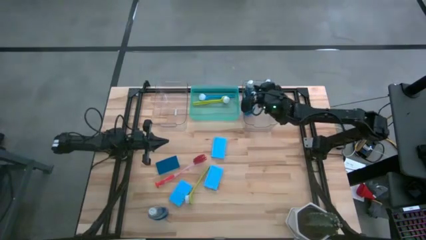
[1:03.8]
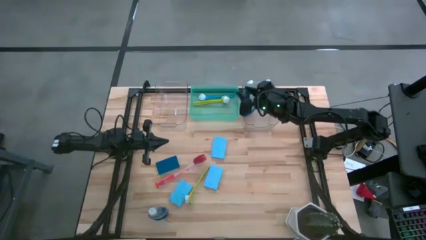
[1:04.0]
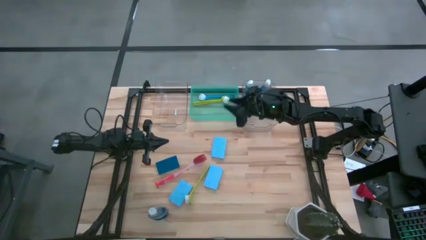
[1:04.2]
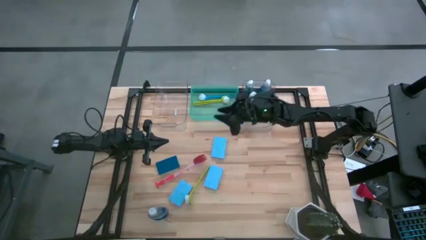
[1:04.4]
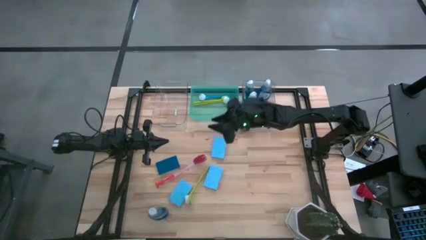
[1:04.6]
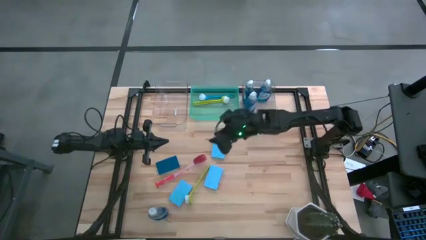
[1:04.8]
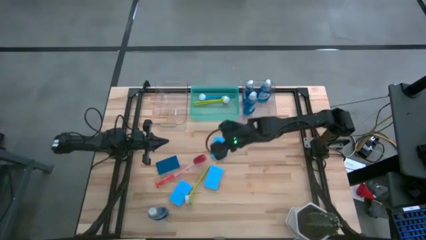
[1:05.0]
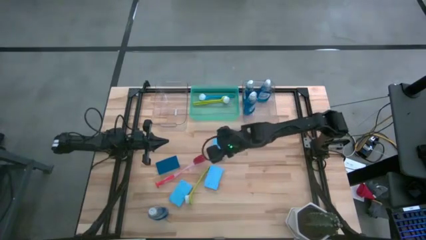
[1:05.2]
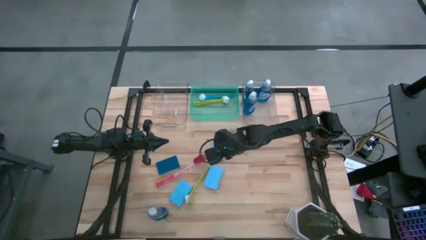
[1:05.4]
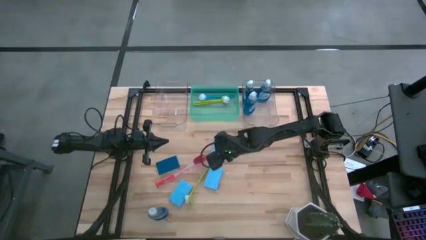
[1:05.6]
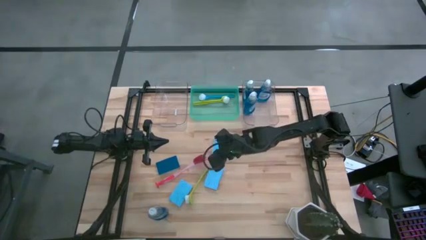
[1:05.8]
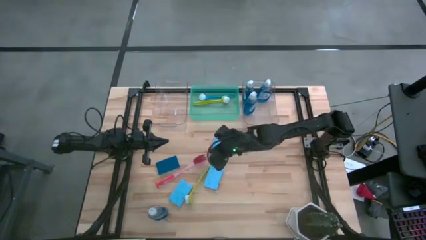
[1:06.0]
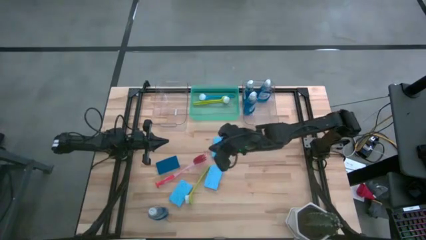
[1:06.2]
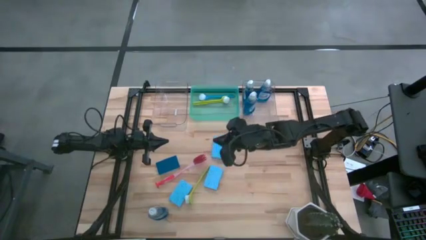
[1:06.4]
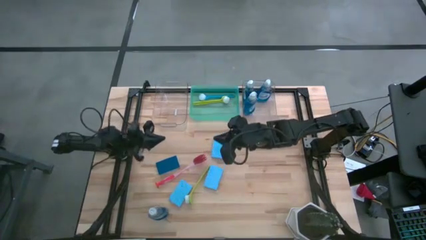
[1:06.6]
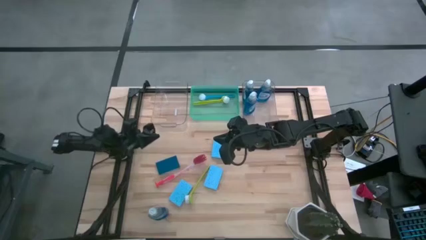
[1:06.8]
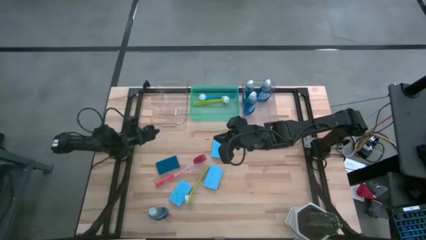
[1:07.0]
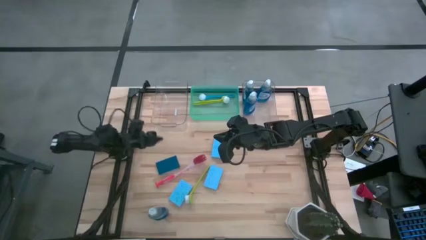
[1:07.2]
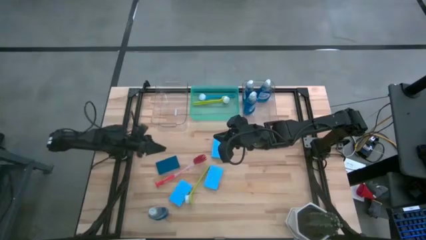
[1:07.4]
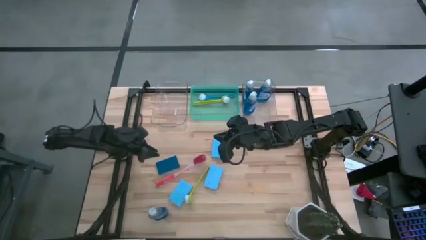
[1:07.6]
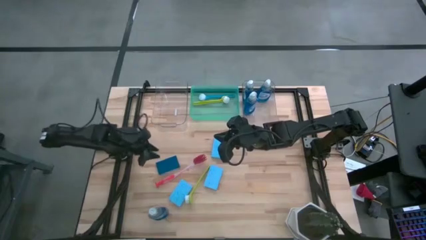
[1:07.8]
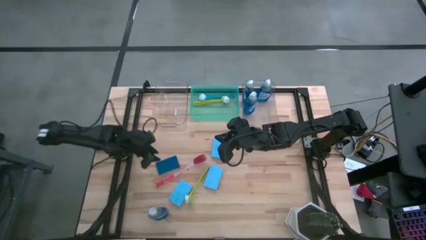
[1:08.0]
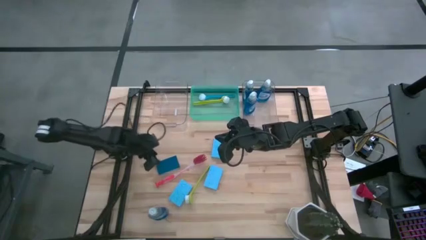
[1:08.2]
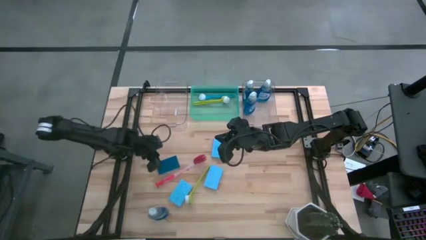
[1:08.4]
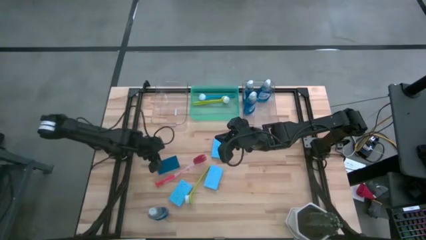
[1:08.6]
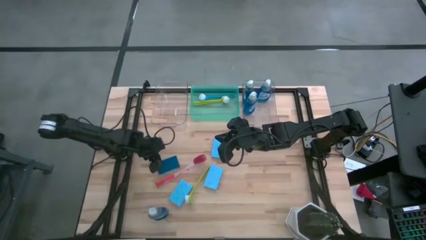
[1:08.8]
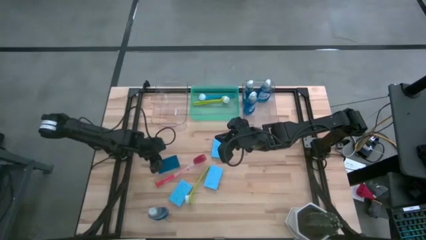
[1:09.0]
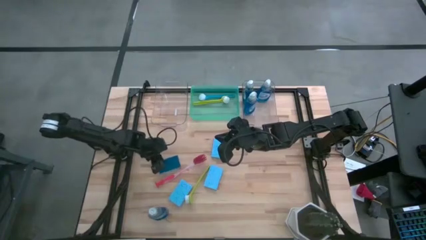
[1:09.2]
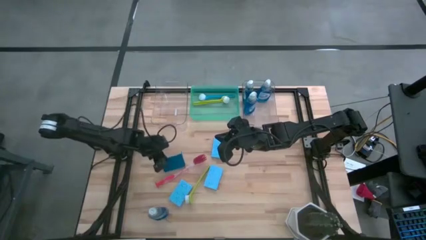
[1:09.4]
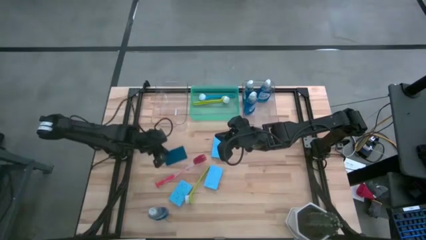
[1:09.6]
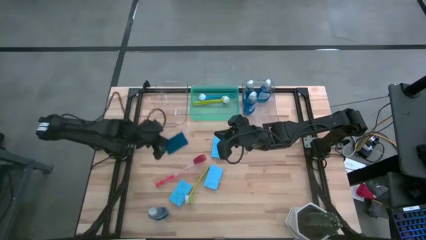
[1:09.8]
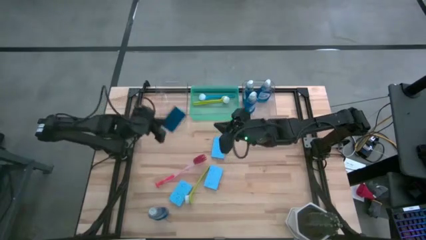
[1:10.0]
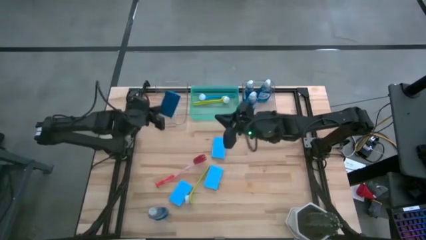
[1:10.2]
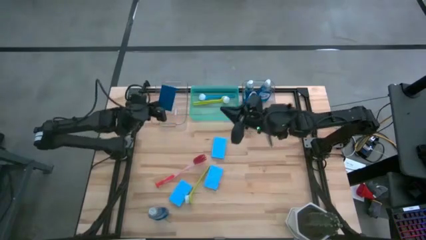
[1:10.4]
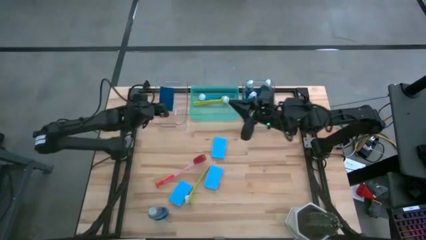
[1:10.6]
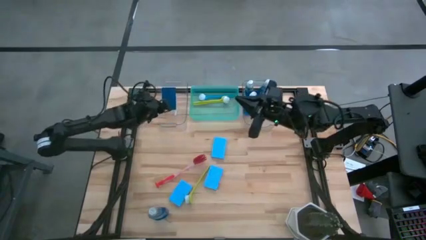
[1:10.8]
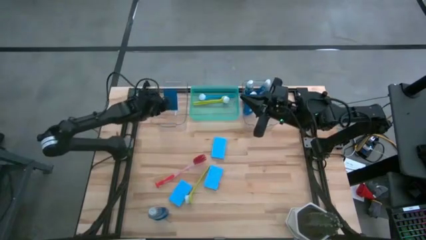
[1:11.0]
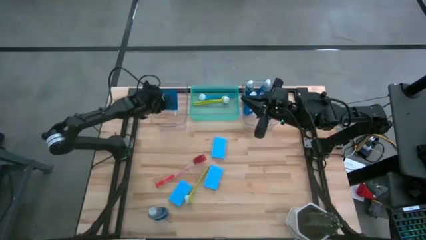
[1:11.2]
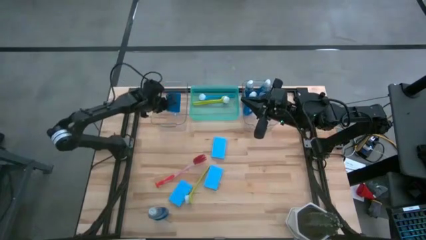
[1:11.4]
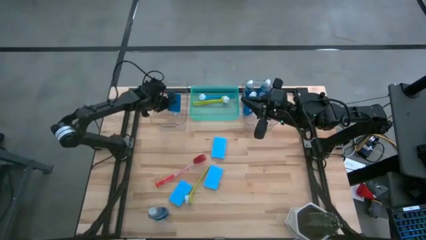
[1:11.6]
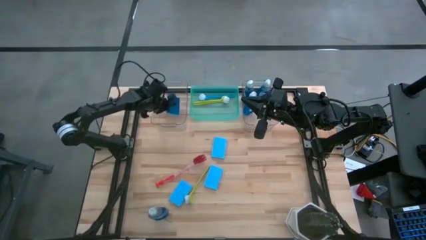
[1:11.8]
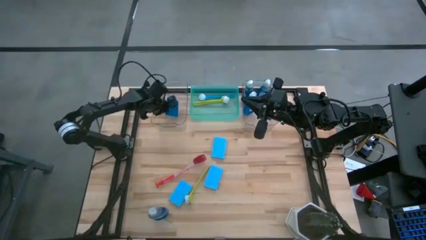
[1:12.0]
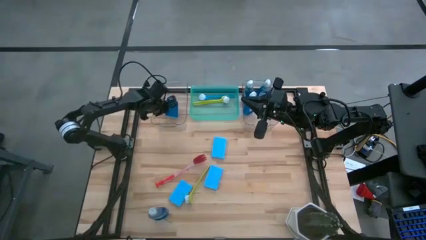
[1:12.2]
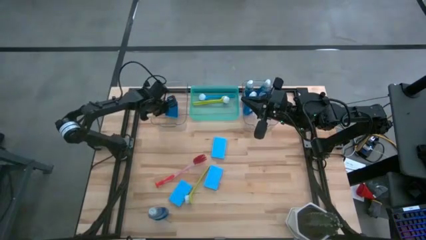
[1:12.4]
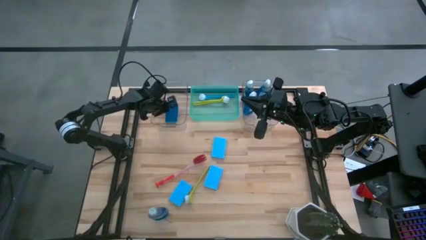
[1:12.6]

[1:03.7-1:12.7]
Task: Pick & Place Kitchen Sink Supplies
Put the blue sponge wipe into the left transparent bin

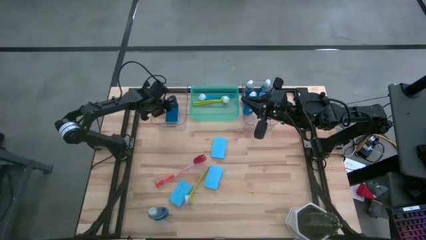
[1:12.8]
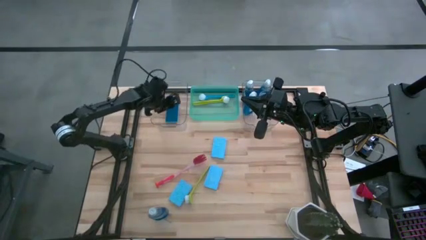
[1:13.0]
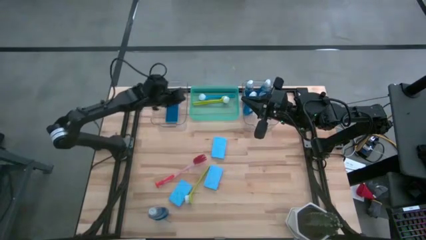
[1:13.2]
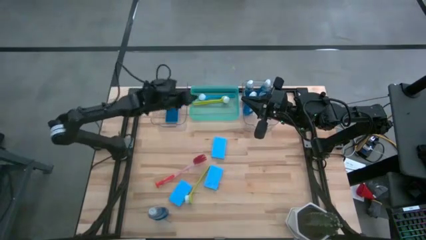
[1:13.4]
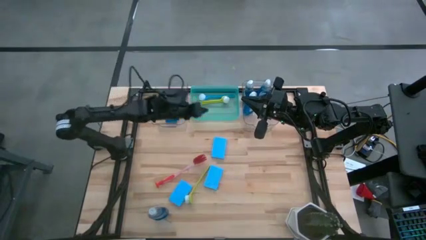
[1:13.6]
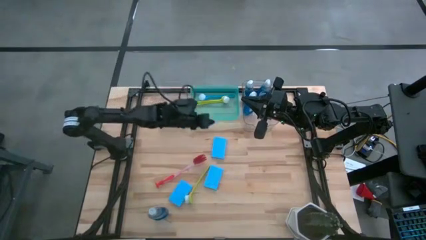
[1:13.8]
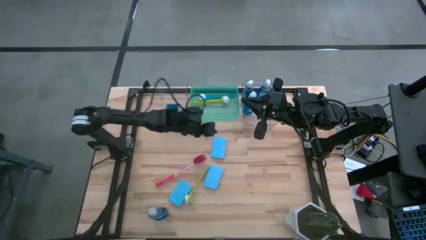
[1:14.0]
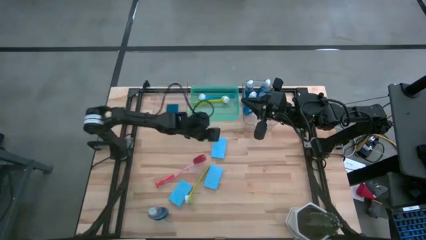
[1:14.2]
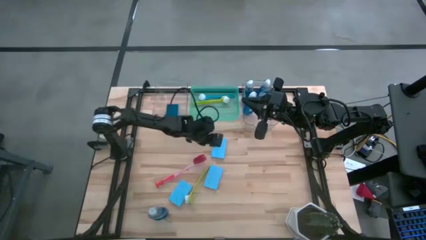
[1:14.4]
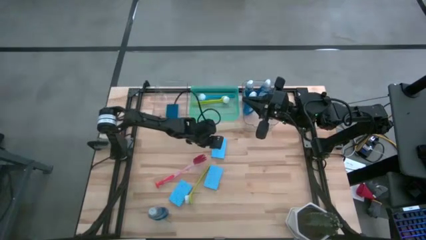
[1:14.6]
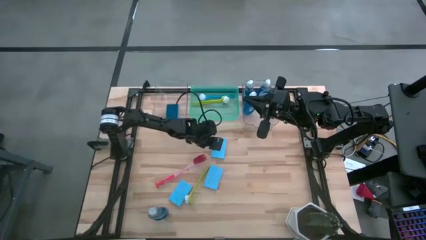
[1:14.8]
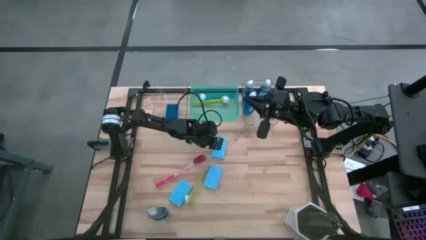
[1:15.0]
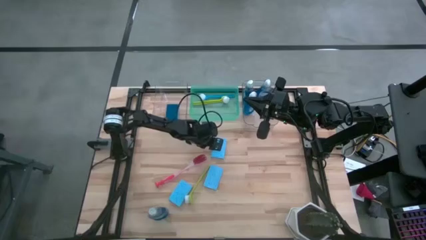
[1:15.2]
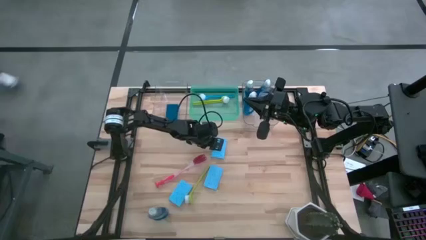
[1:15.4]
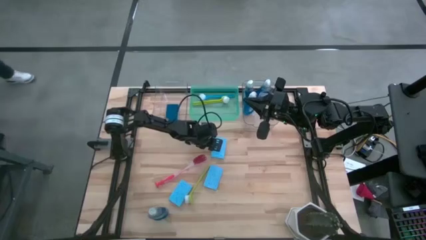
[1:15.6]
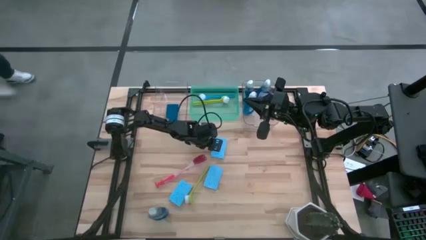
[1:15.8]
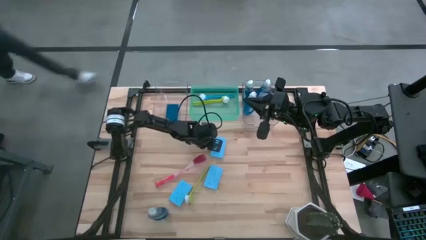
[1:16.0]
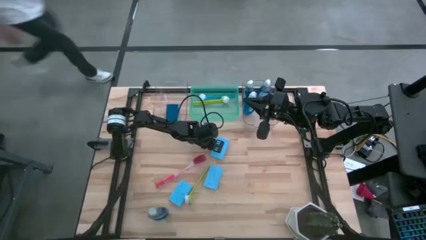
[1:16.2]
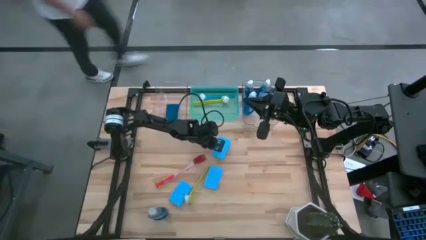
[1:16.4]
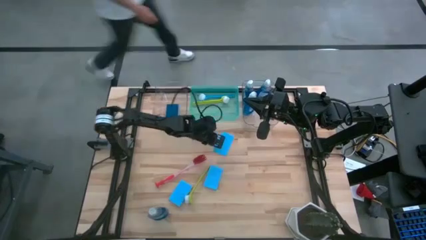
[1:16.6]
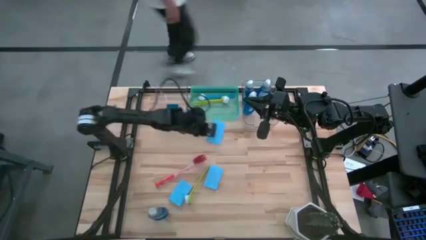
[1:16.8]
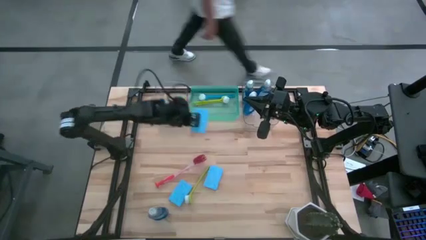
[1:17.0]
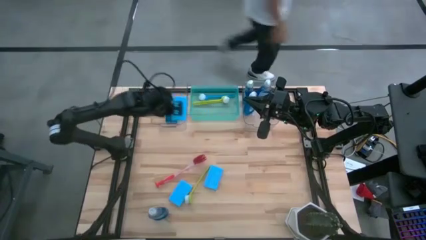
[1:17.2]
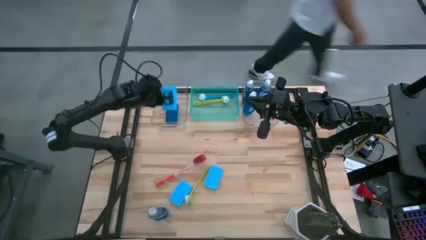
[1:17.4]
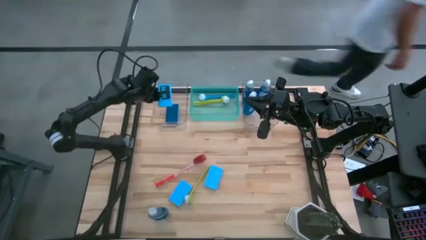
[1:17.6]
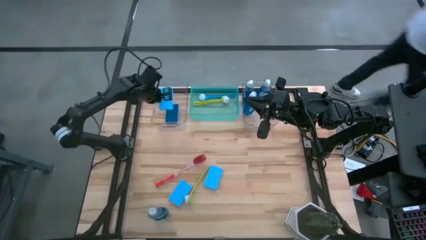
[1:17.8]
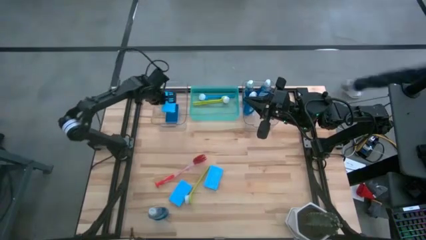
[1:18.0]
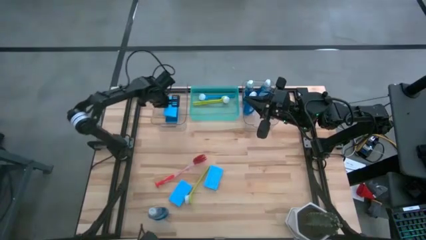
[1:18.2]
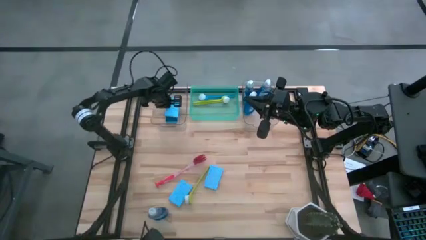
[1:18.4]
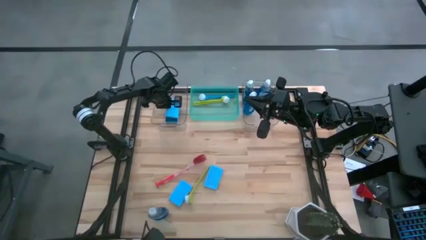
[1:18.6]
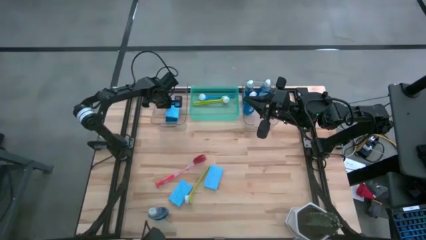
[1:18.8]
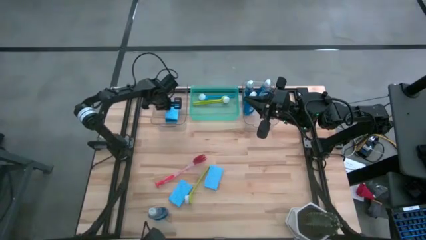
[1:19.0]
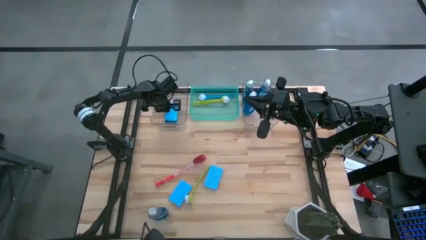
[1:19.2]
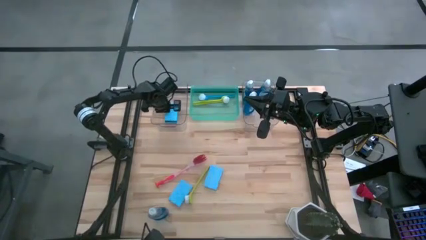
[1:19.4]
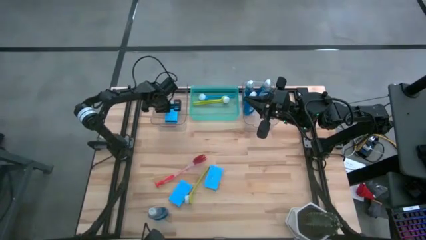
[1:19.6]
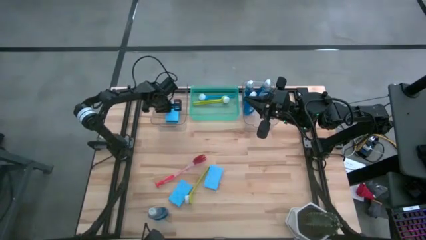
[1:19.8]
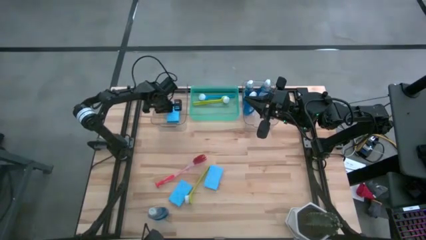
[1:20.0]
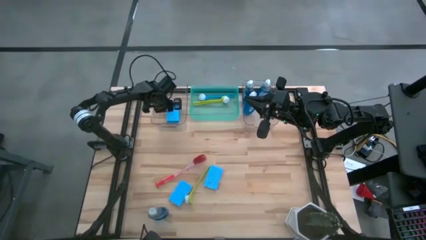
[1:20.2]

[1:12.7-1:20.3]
Put the blue sponge wipe into the left transparent bin
